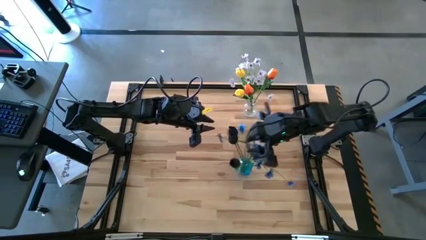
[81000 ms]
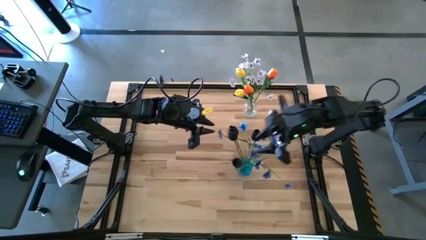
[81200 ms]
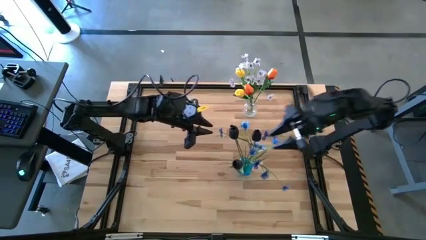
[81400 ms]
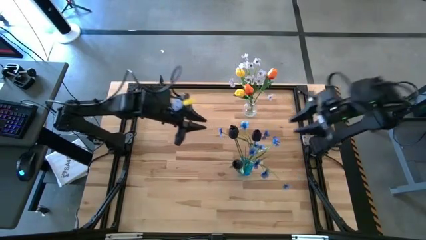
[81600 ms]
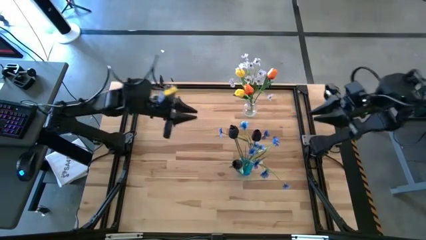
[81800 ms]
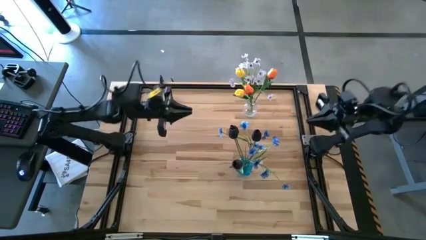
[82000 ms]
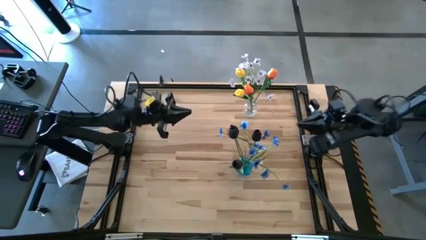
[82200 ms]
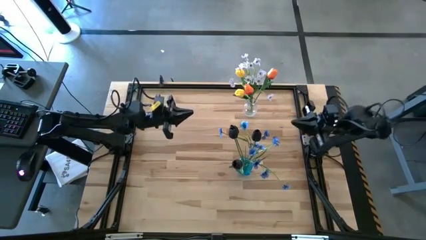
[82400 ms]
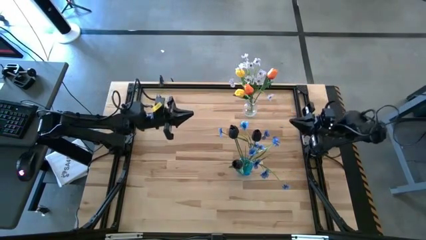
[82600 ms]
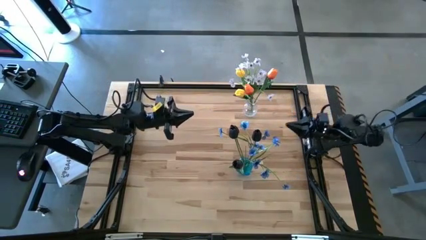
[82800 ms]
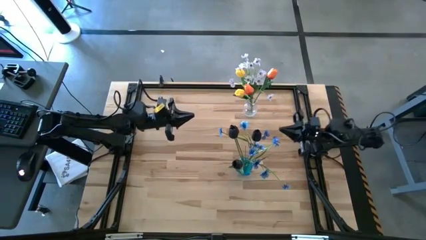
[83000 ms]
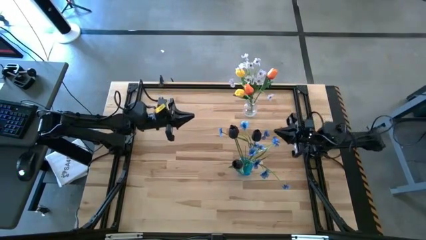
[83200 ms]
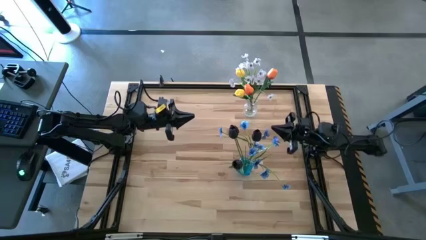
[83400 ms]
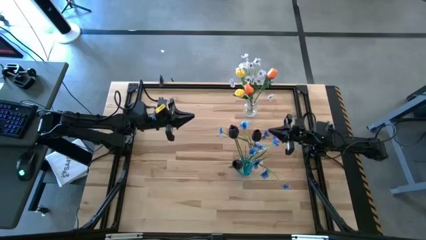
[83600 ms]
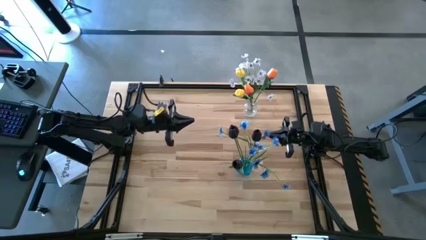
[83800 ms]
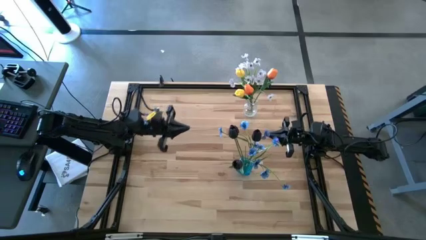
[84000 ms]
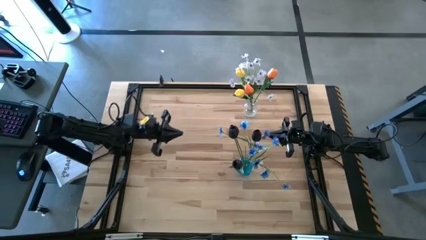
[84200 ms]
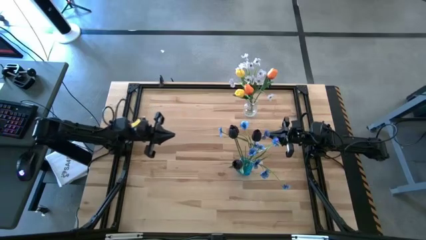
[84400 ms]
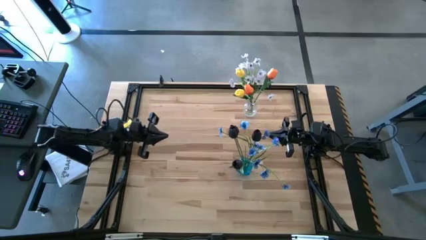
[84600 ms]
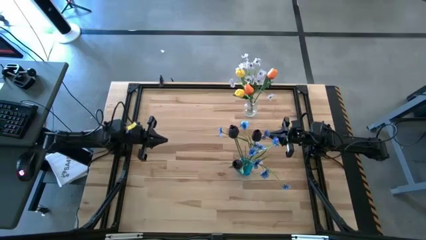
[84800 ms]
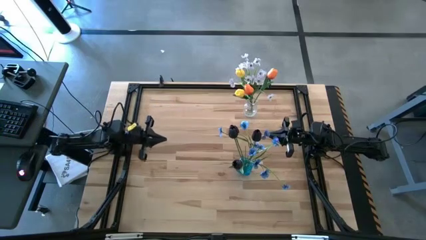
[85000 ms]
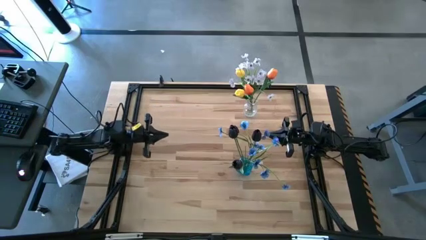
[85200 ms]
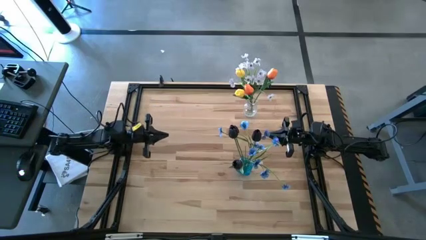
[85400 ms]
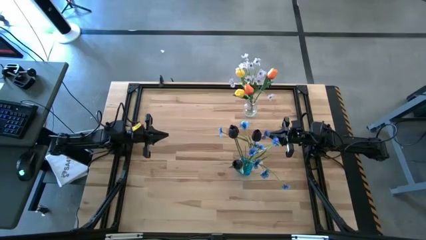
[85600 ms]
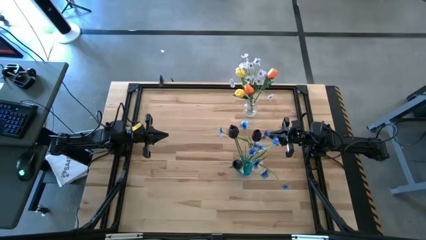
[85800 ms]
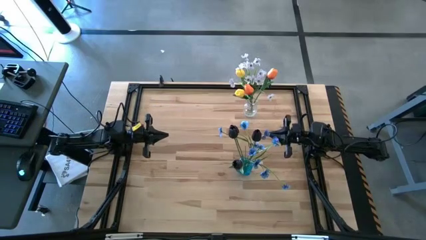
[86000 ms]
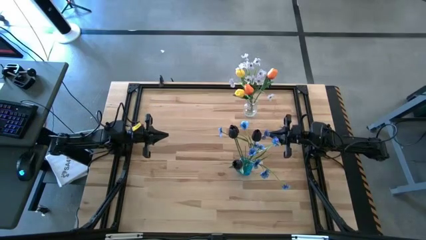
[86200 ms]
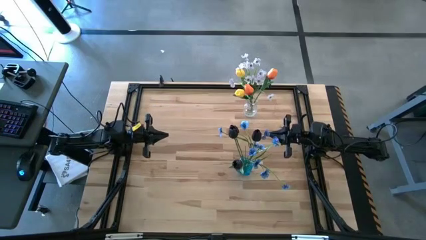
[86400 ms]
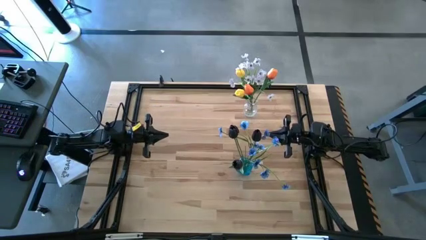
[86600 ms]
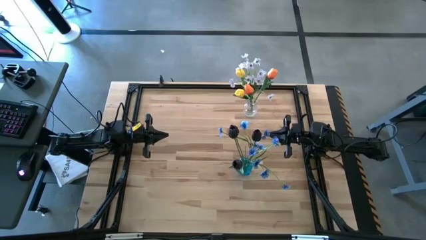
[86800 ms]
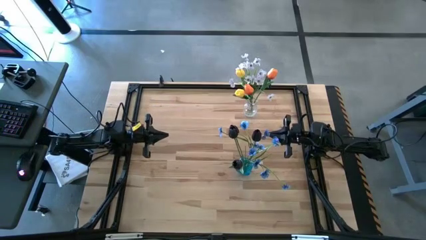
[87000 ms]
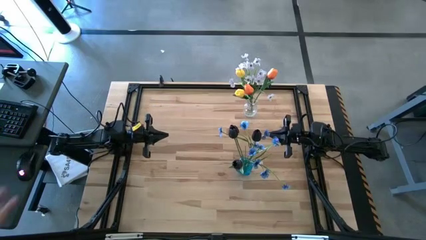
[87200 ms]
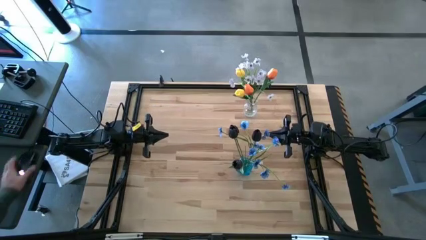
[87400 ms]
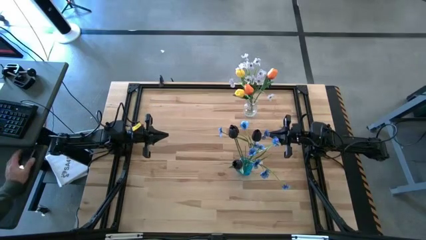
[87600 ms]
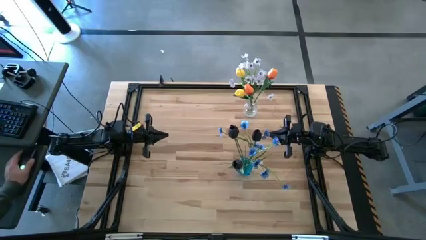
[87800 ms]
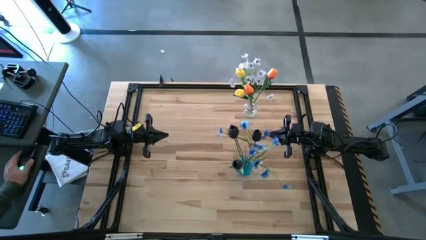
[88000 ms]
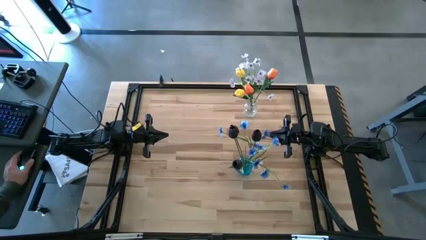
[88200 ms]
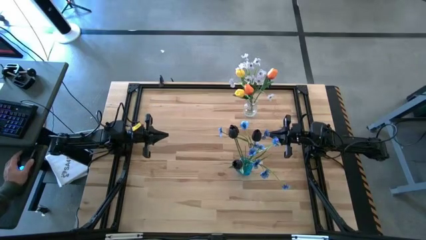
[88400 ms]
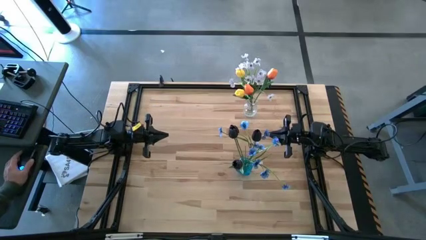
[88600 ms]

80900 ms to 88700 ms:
Task: Sort flowers into vase by color
Return to Home Position

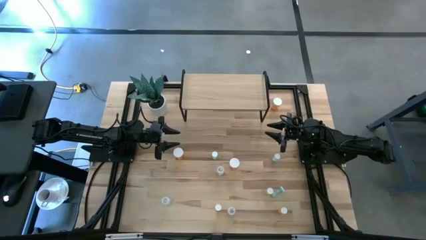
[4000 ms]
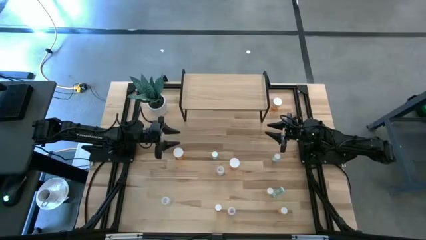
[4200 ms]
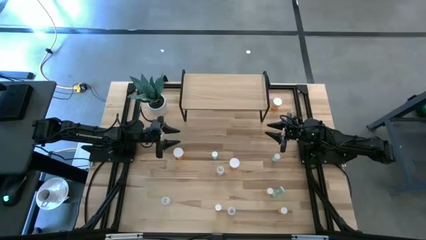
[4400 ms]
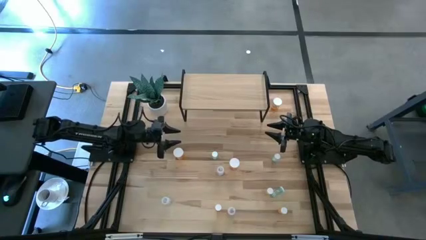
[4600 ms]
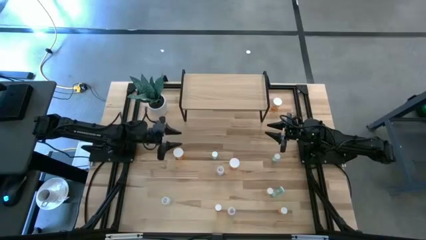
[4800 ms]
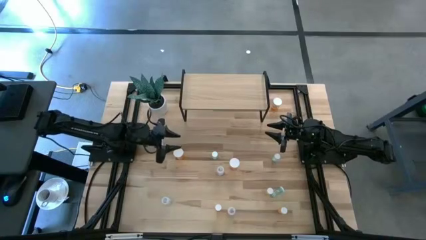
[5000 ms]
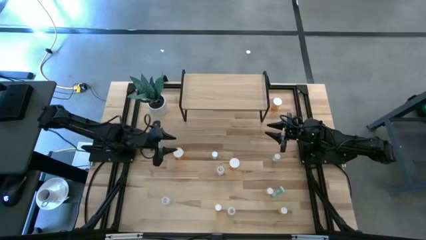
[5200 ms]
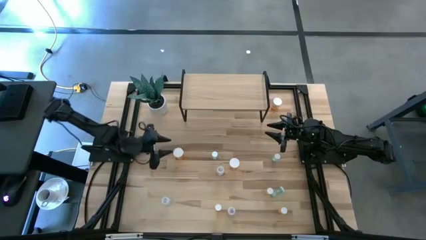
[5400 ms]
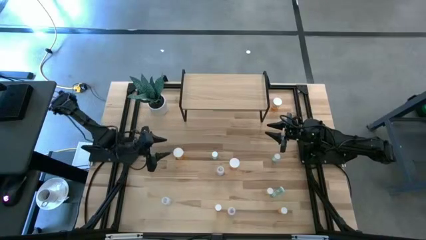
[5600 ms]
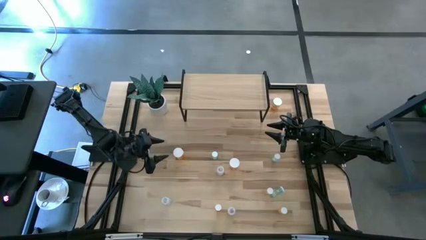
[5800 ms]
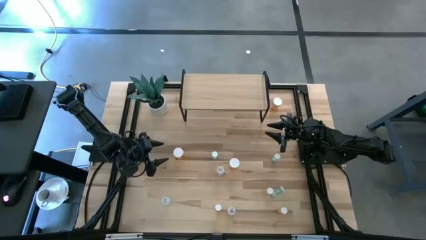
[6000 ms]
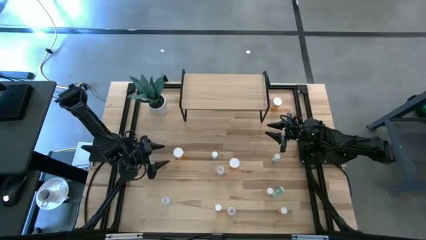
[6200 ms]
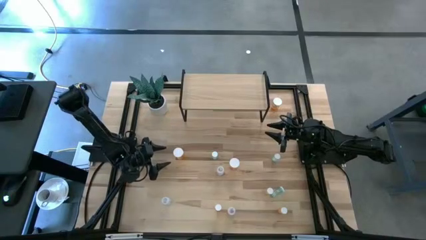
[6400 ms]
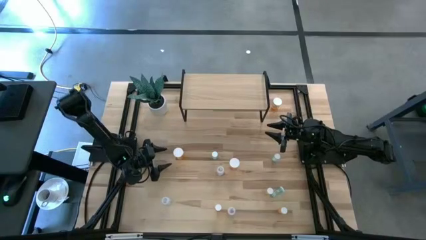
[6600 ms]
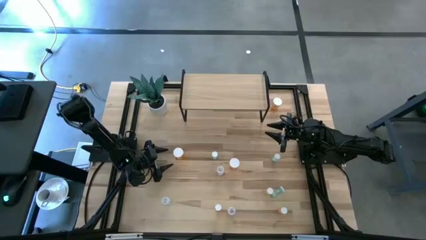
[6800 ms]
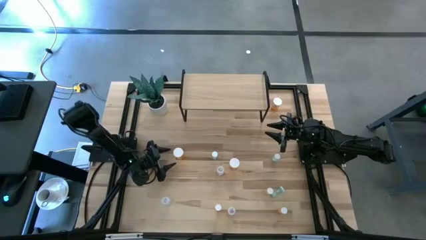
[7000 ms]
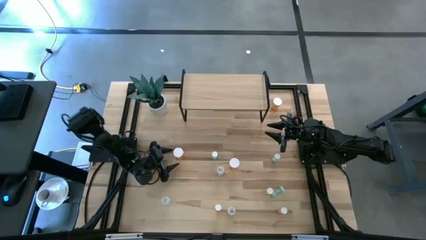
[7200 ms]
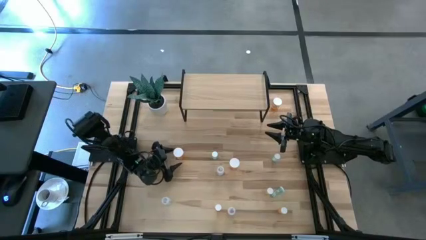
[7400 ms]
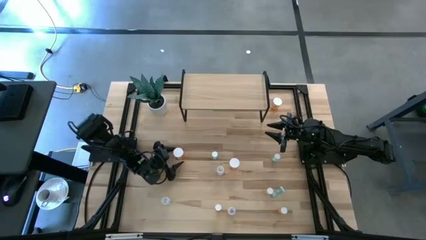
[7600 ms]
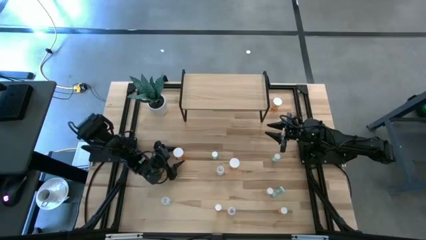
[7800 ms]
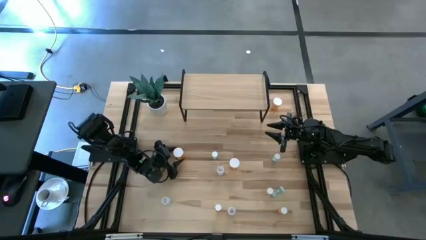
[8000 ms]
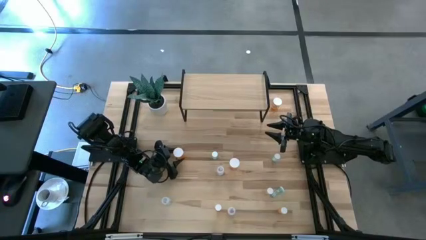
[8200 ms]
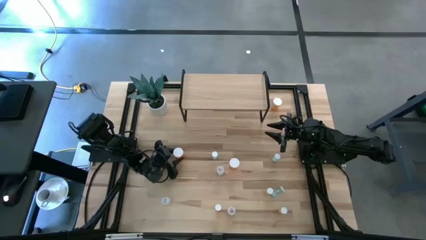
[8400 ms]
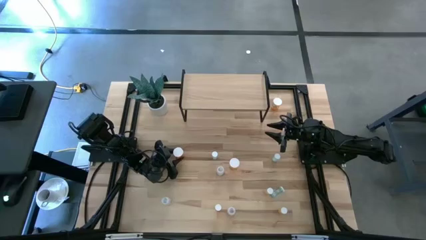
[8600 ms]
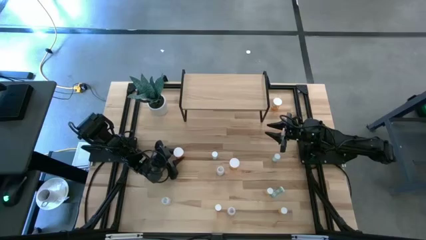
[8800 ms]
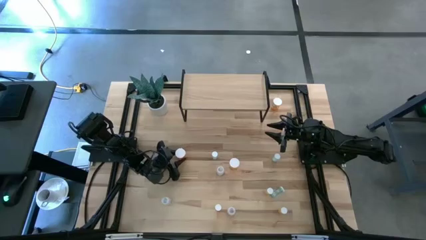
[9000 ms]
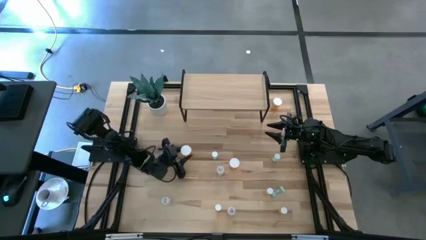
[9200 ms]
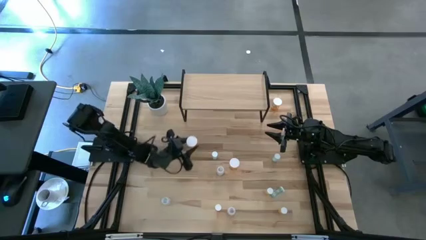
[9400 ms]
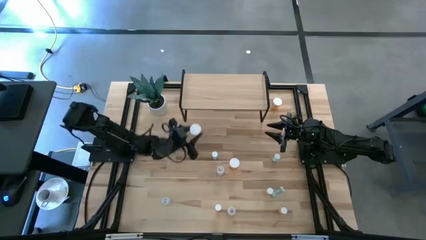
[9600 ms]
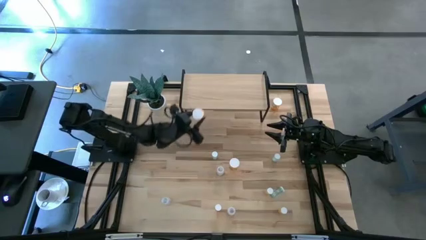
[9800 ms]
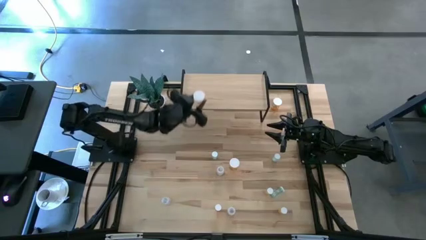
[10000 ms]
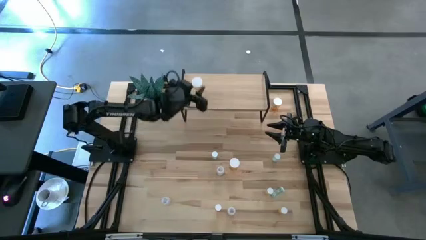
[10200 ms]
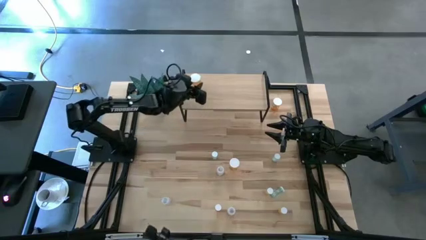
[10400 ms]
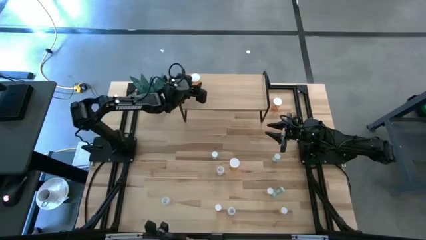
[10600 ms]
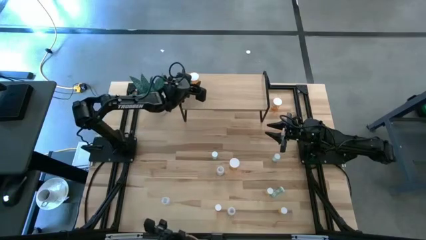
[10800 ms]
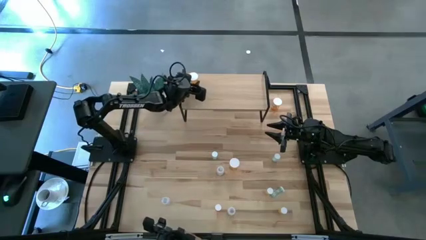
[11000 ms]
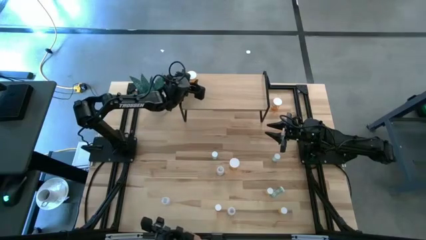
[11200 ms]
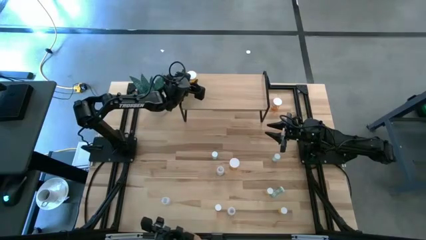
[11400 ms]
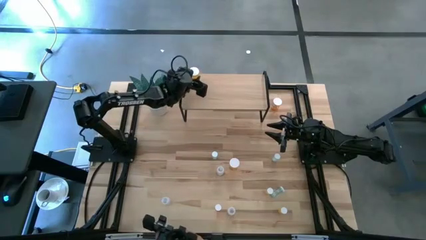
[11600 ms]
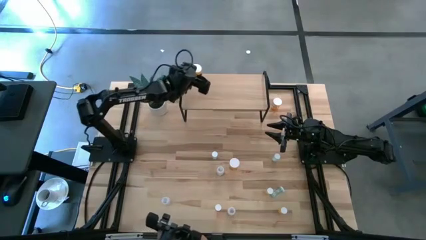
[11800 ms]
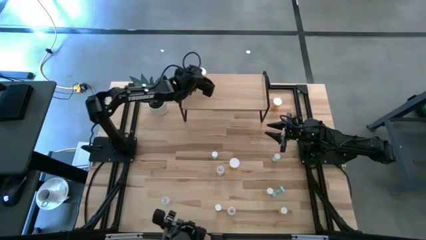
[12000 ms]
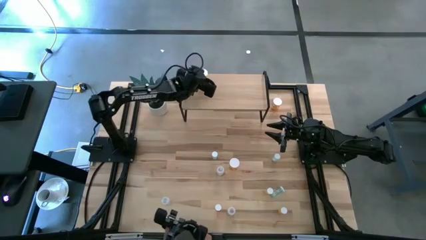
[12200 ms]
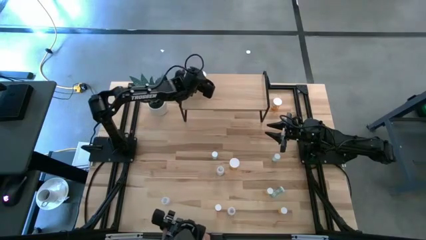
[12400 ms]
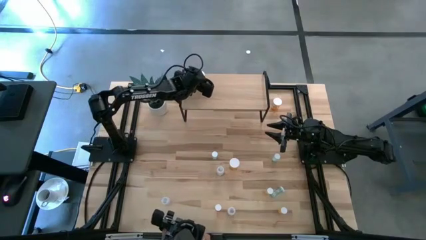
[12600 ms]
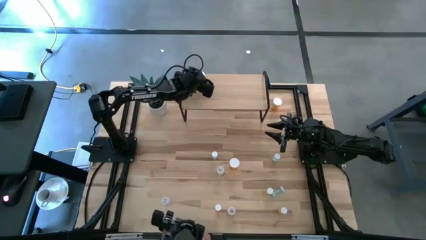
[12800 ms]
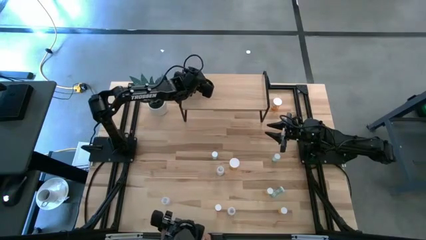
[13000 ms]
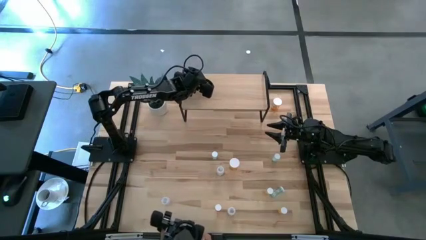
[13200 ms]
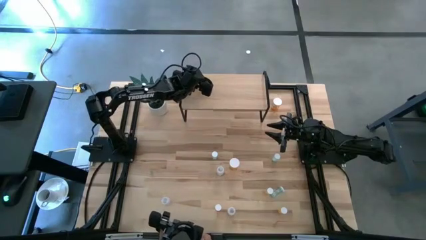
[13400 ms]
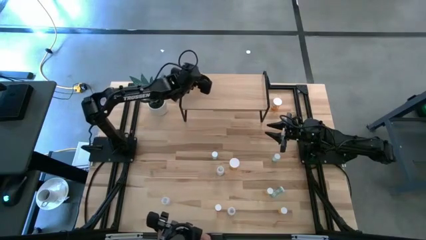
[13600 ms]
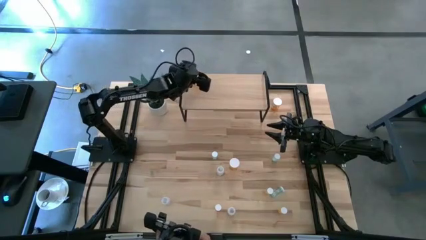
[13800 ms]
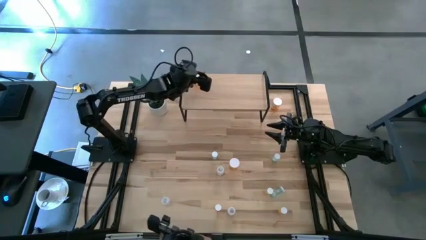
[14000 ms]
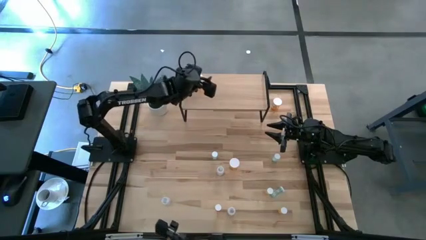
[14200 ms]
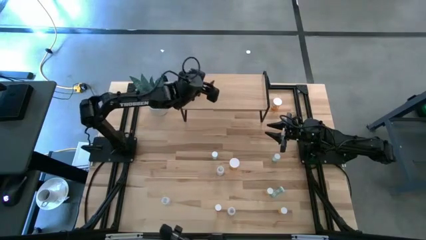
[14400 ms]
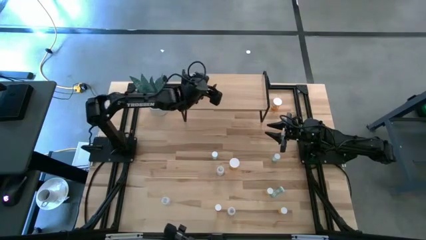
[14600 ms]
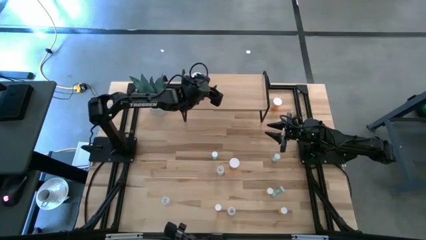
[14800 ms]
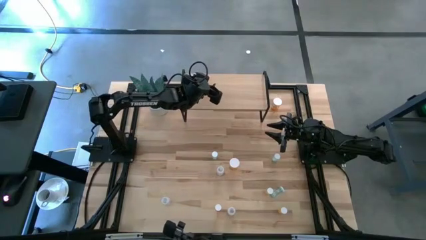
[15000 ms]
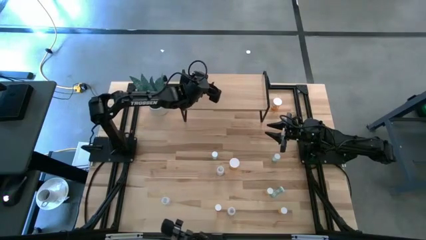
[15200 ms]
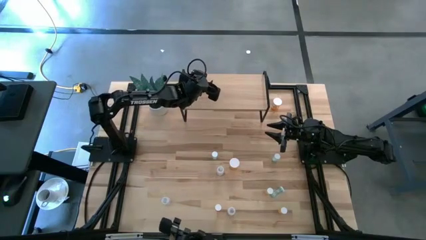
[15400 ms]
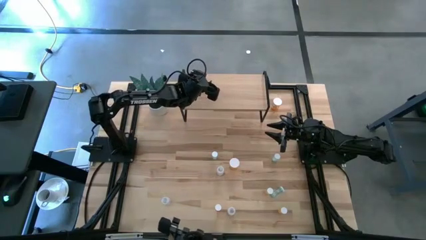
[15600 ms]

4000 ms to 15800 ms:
Task: Pick and place medicine bottles onto shelf by color
Put the bottom left large orange pill bottle on the shelf
